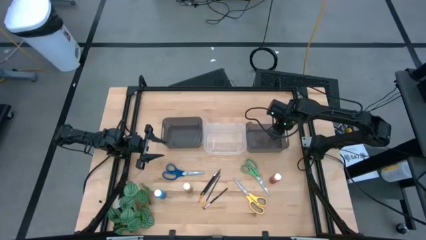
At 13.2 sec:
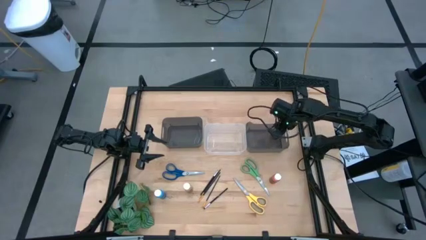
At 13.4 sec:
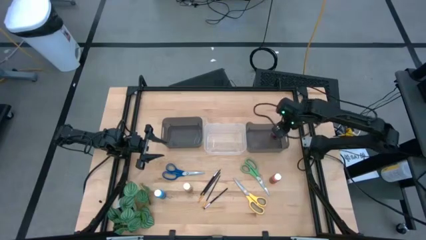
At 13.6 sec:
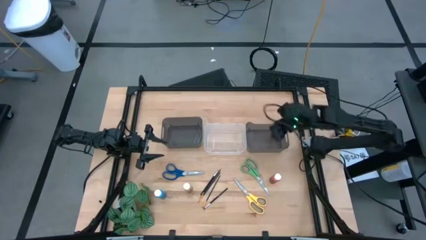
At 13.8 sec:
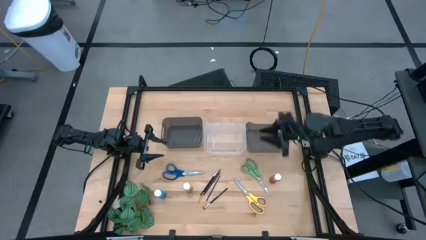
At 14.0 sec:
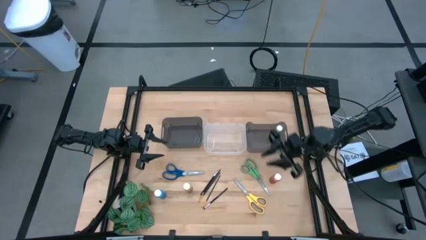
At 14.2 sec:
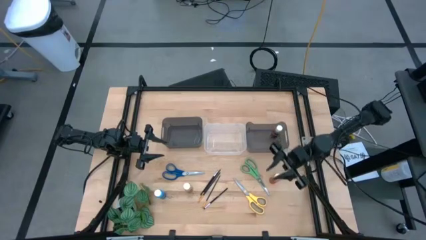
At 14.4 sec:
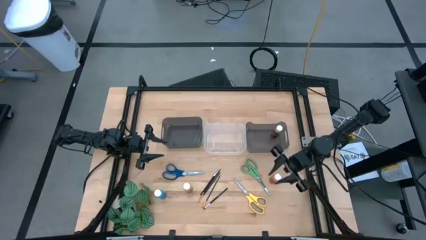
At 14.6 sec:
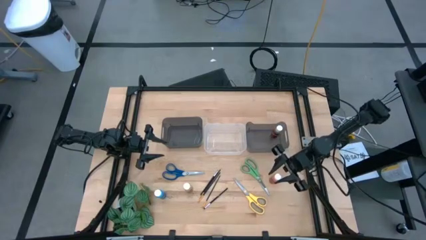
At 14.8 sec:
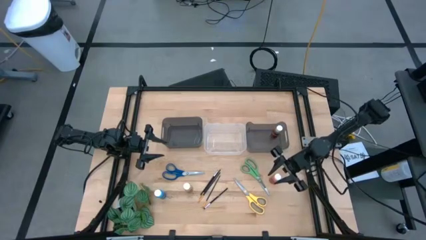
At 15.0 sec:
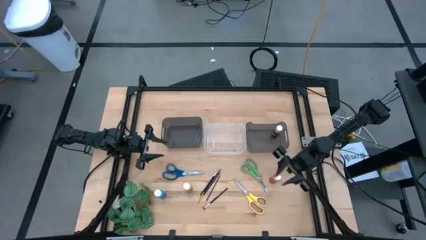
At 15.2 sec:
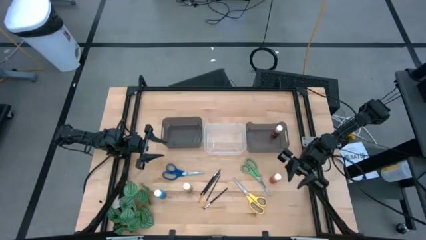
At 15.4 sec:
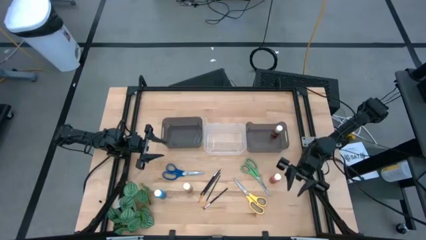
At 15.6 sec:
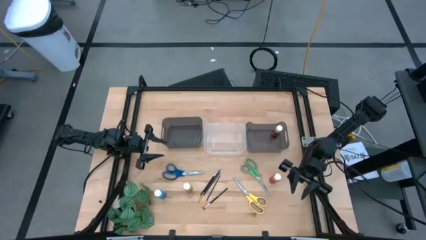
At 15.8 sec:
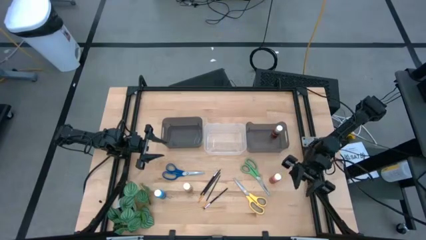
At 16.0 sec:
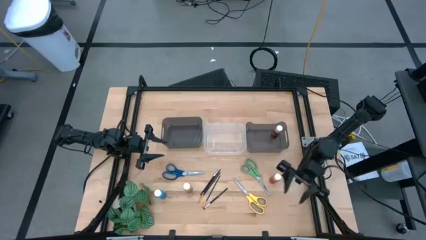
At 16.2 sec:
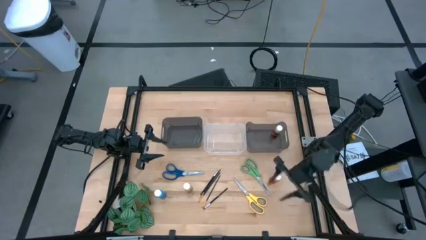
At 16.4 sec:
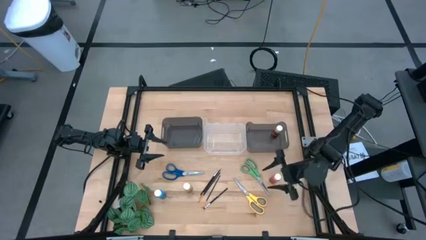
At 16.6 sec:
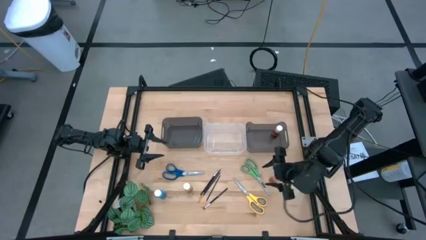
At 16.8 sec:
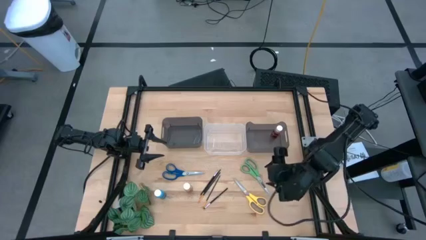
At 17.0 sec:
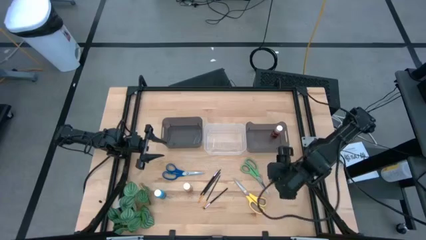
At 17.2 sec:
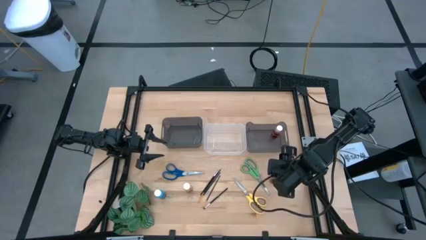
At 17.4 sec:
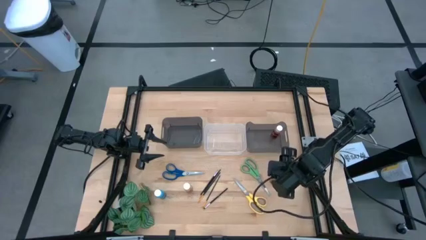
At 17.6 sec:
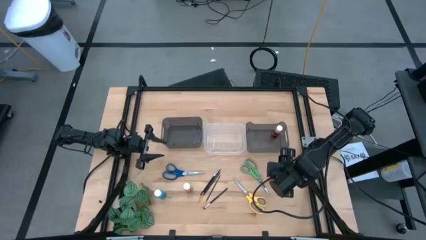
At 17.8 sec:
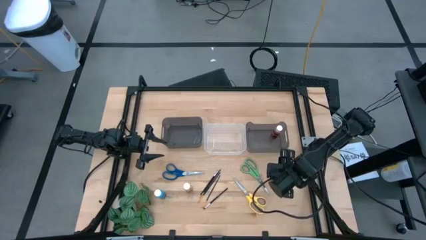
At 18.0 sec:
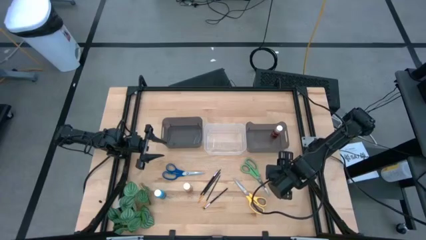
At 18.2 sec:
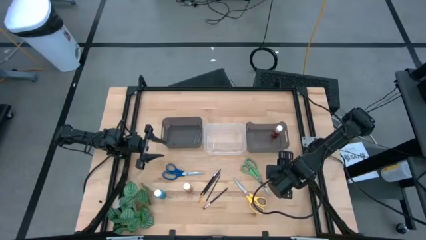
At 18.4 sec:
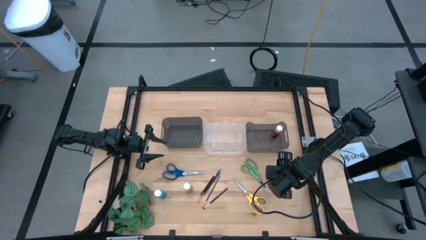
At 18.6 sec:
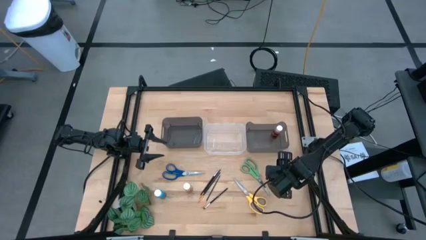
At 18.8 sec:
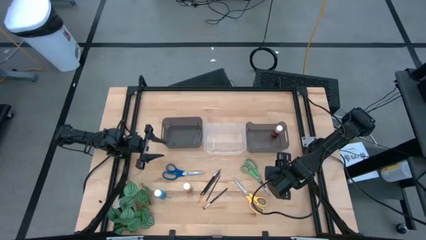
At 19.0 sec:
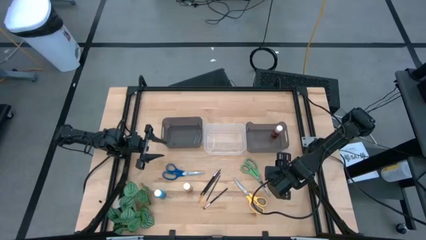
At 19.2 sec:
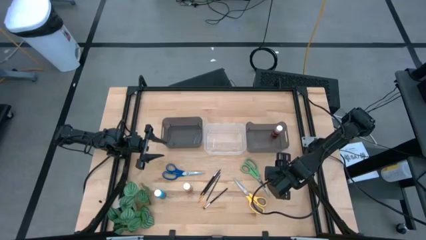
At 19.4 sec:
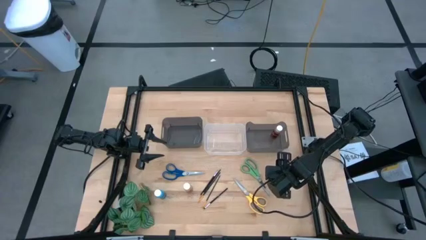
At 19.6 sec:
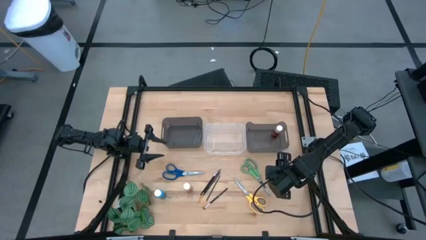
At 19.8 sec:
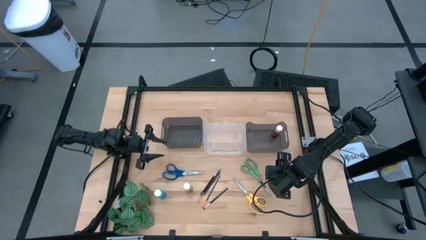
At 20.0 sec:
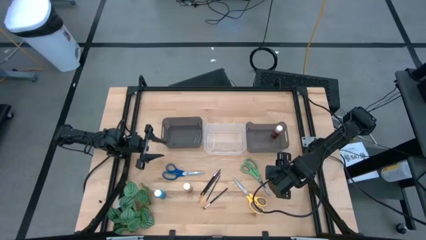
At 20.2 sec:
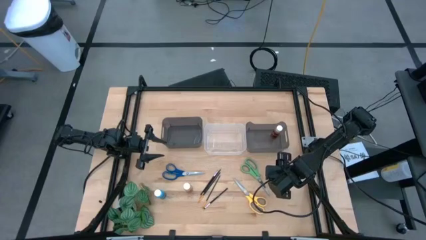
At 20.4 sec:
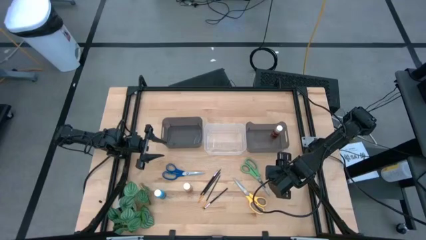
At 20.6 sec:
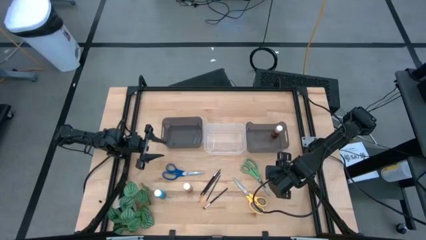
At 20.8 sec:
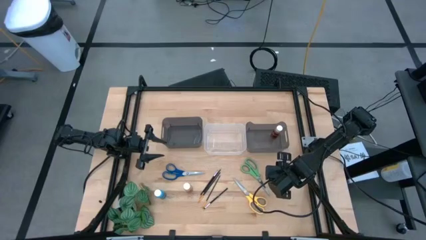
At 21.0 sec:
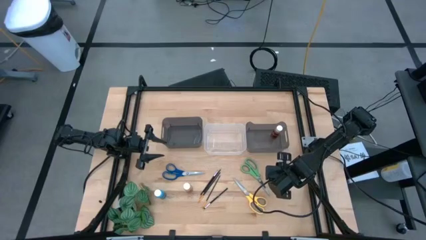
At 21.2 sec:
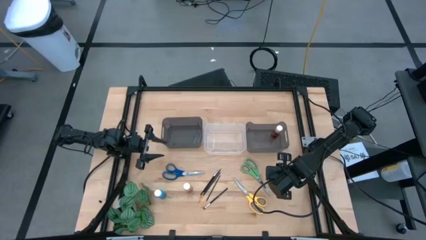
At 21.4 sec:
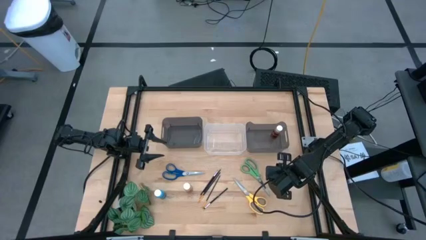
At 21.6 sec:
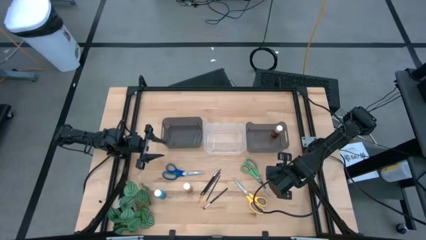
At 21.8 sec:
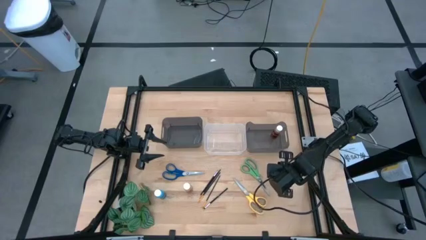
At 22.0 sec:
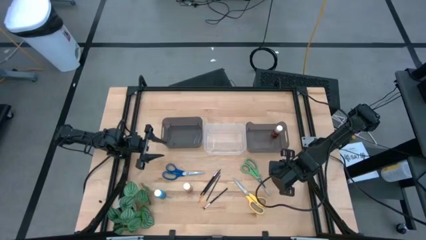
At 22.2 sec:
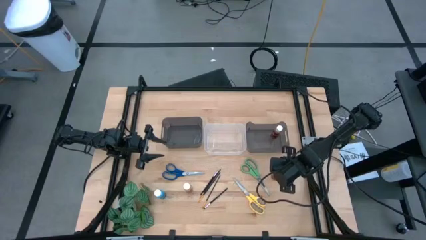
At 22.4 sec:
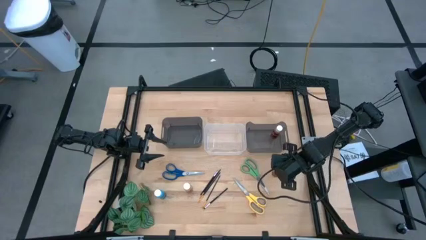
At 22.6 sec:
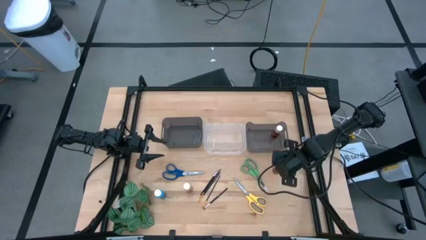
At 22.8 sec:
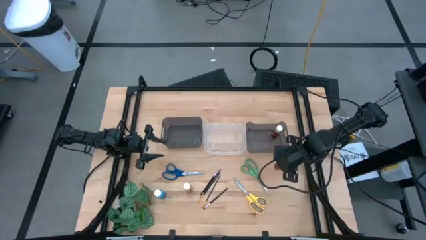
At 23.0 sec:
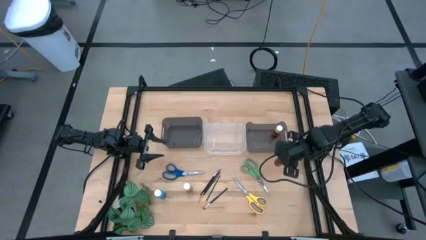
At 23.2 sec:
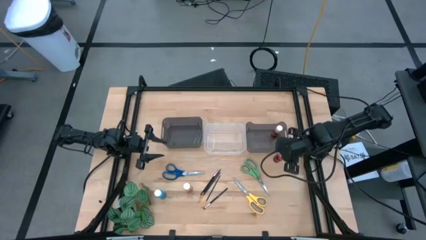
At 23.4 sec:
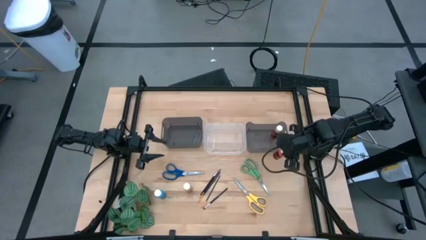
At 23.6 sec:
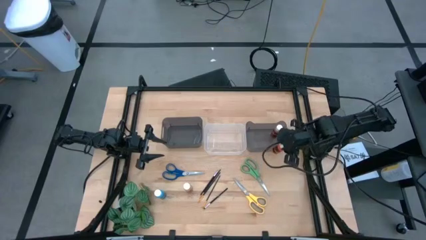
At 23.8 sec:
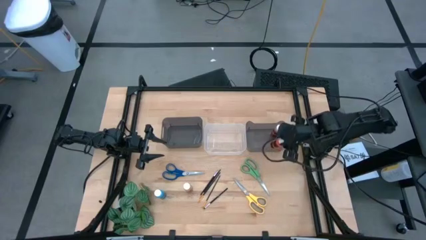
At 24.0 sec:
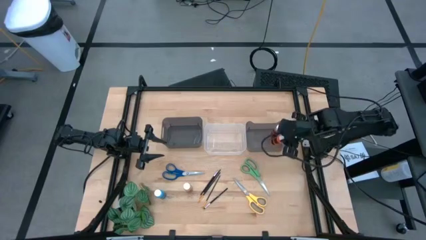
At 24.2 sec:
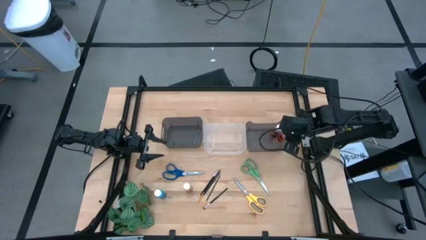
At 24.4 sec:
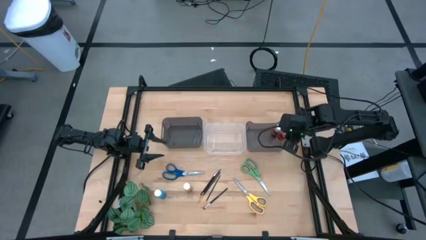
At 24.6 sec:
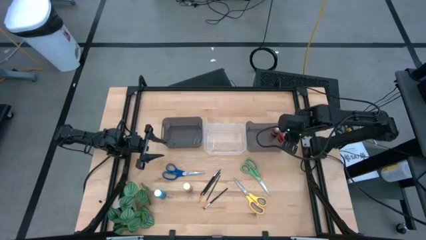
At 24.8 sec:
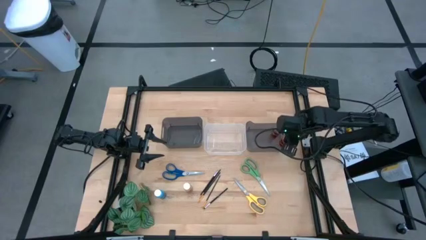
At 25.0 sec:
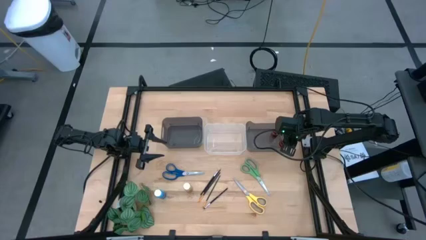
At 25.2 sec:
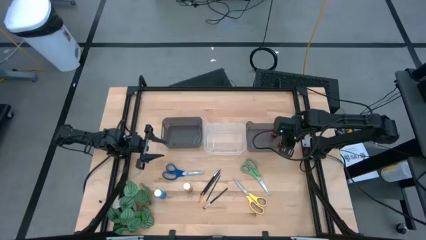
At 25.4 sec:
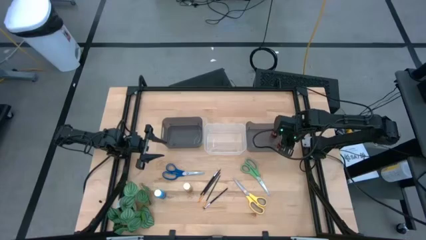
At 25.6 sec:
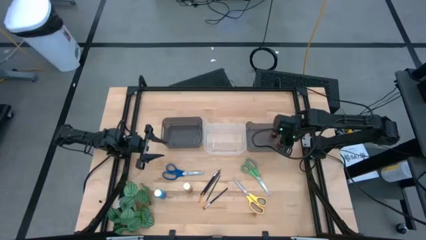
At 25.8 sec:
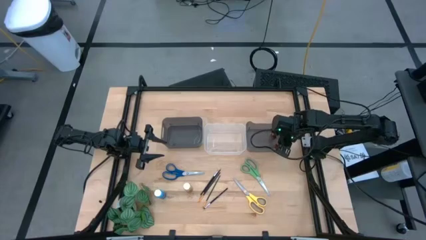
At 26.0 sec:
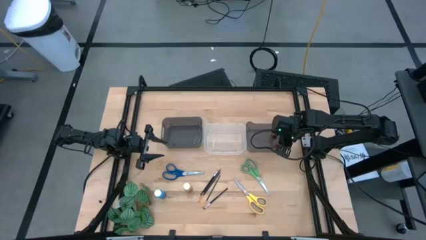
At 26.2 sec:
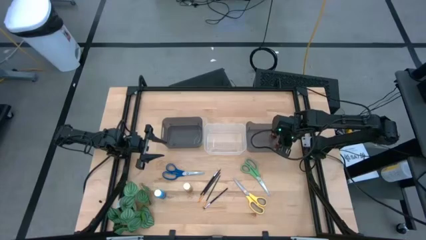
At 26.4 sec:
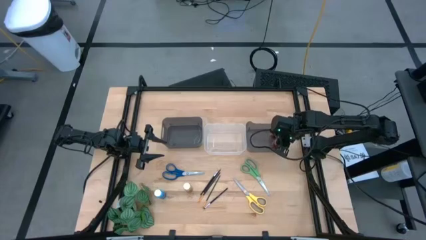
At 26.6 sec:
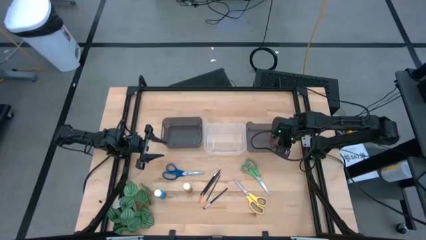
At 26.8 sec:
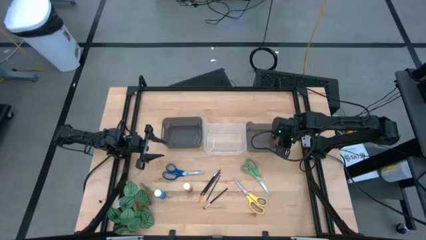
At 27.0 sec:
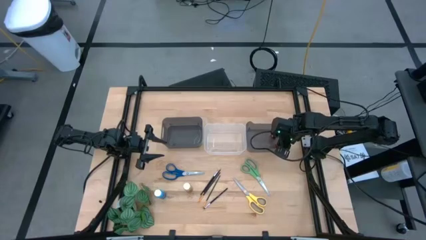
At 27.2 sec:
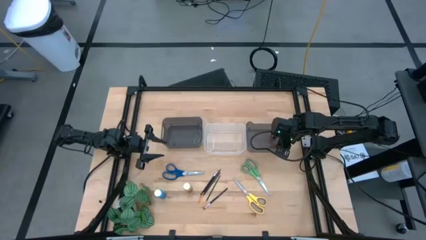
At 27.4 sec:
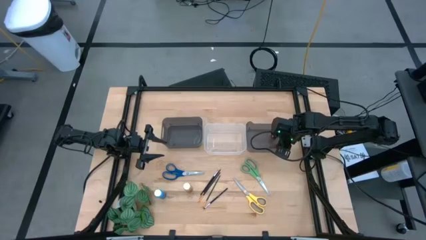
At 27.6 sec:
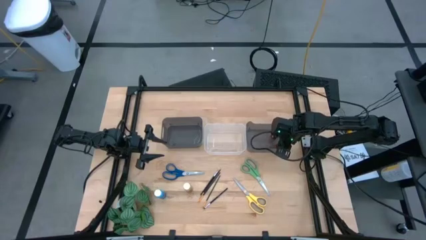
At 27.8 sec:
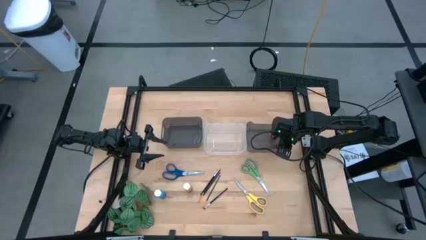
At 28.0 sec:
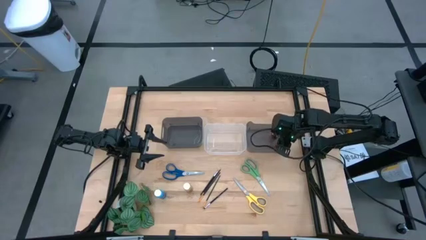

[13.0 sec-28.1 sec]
Task: Pick & Place Paint Supplies
Put the orange paint bottle into the right black bin
